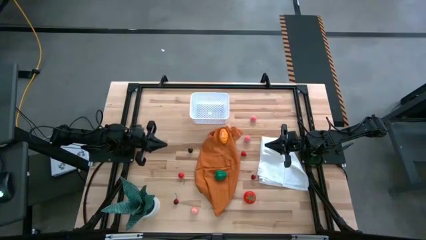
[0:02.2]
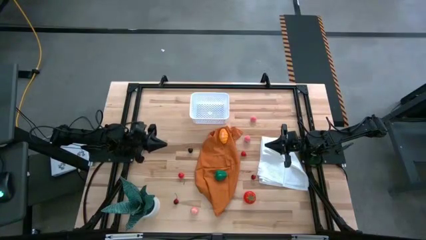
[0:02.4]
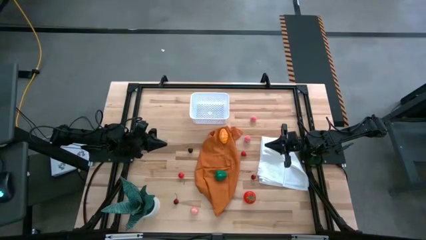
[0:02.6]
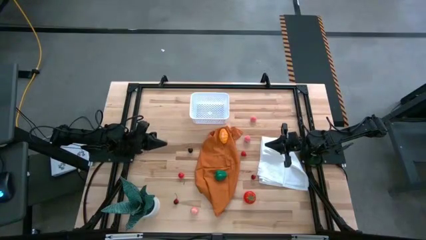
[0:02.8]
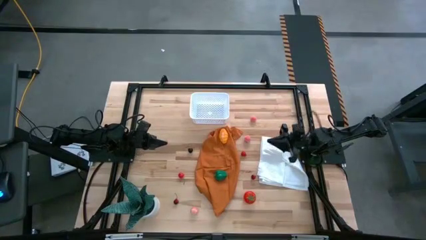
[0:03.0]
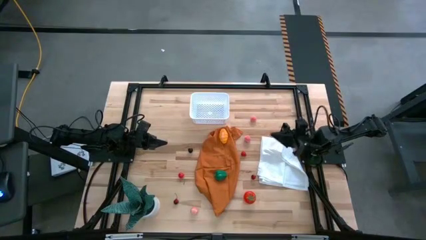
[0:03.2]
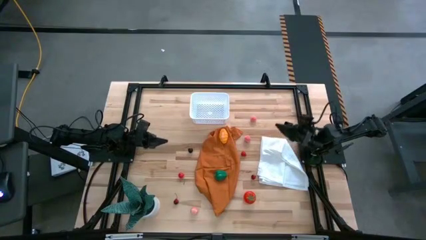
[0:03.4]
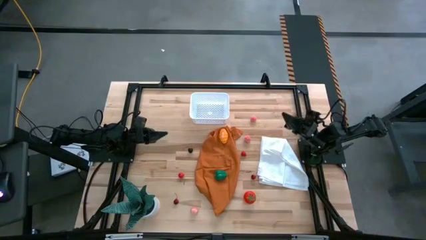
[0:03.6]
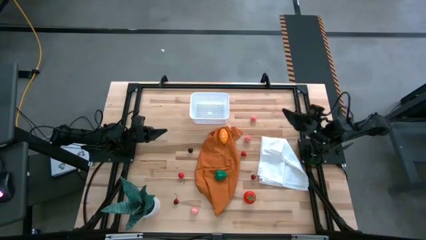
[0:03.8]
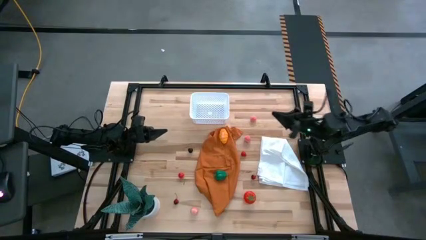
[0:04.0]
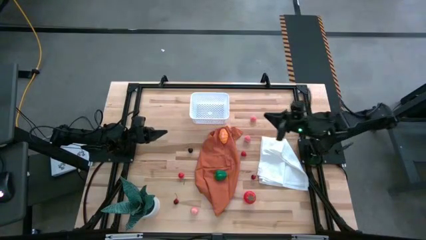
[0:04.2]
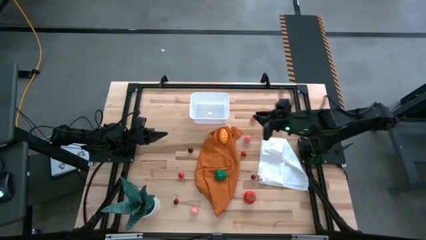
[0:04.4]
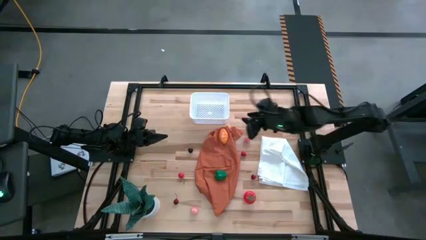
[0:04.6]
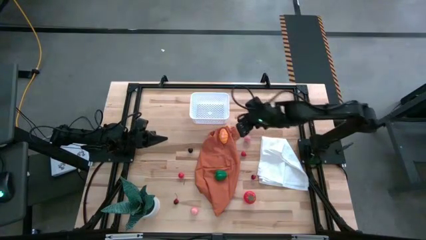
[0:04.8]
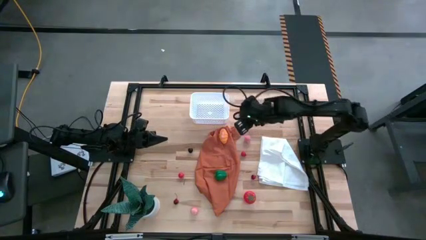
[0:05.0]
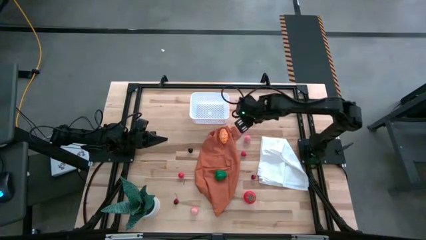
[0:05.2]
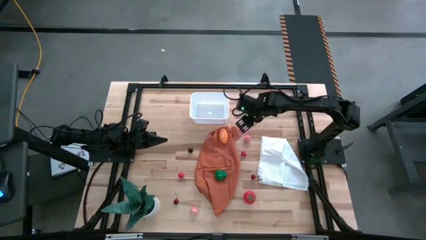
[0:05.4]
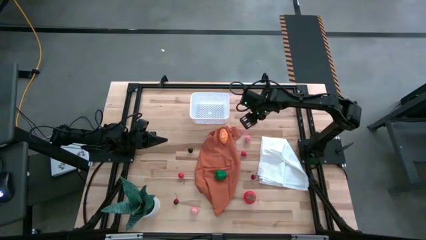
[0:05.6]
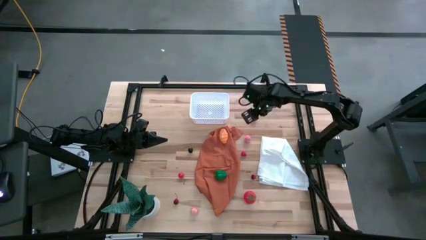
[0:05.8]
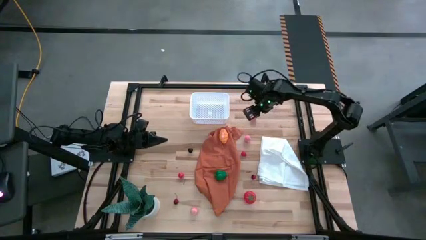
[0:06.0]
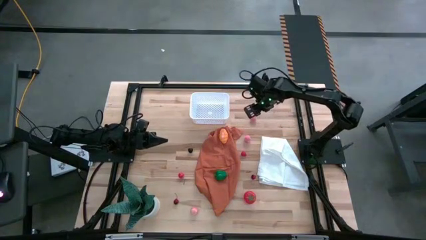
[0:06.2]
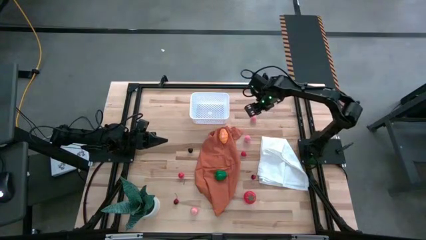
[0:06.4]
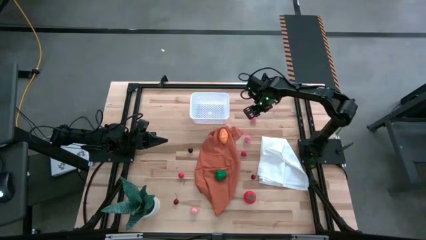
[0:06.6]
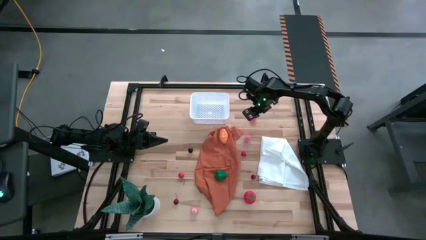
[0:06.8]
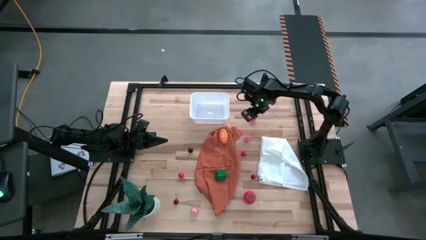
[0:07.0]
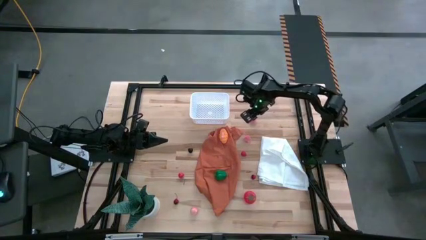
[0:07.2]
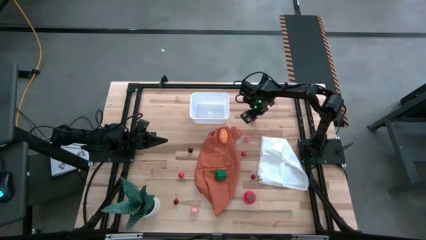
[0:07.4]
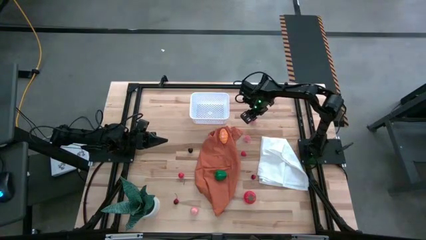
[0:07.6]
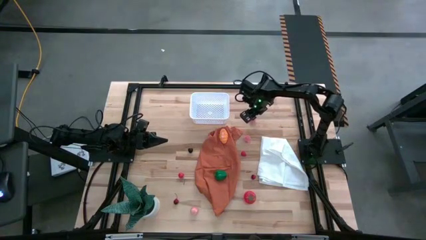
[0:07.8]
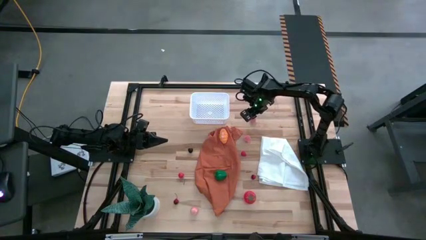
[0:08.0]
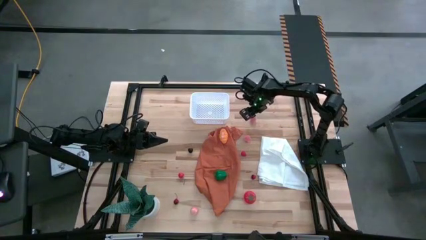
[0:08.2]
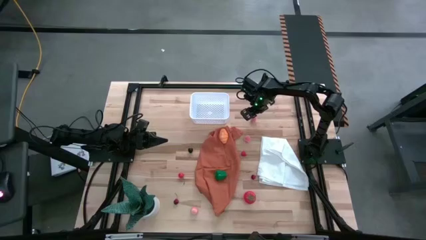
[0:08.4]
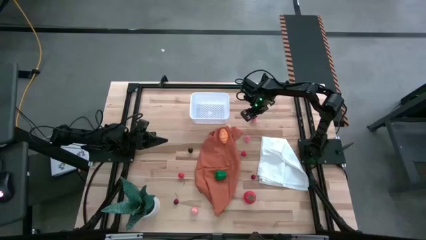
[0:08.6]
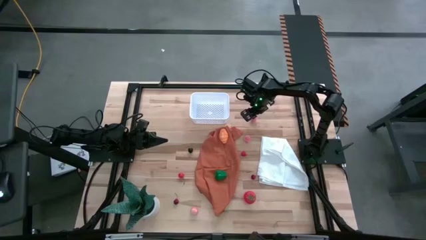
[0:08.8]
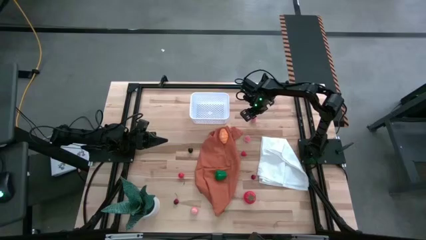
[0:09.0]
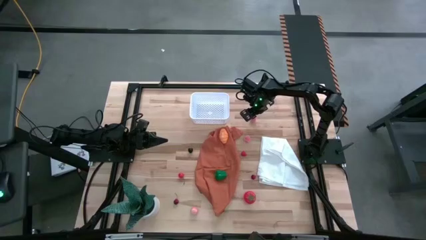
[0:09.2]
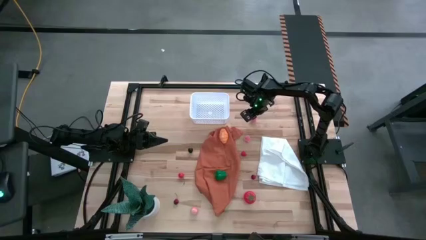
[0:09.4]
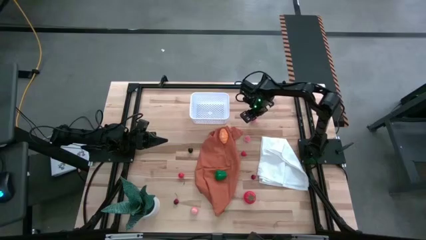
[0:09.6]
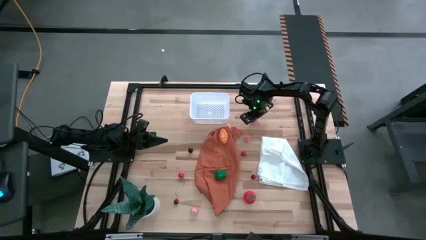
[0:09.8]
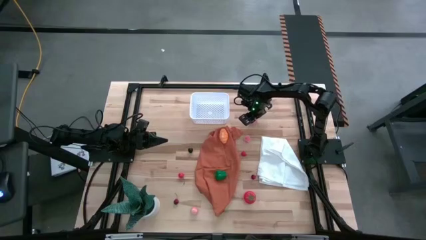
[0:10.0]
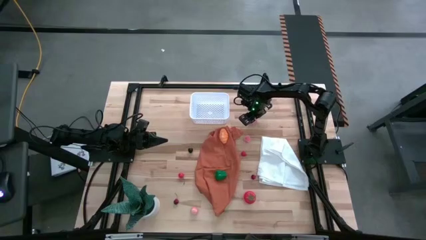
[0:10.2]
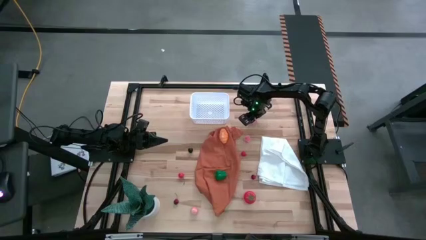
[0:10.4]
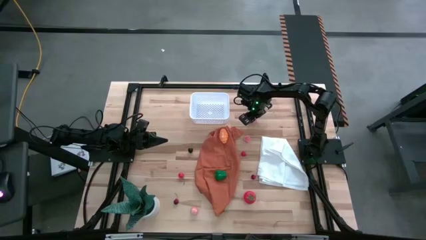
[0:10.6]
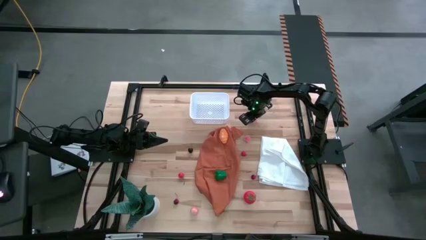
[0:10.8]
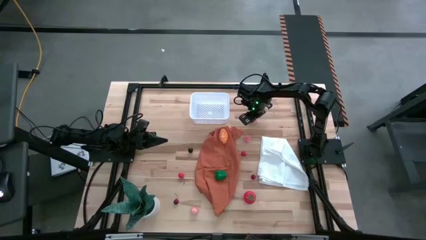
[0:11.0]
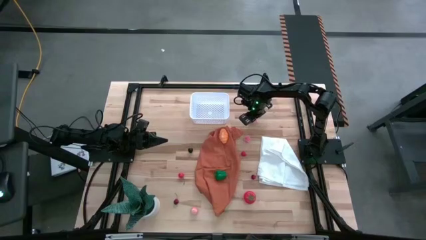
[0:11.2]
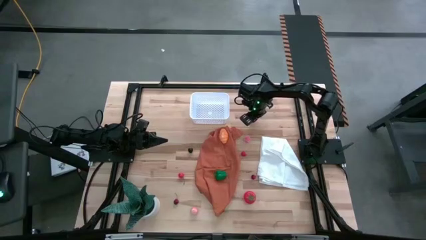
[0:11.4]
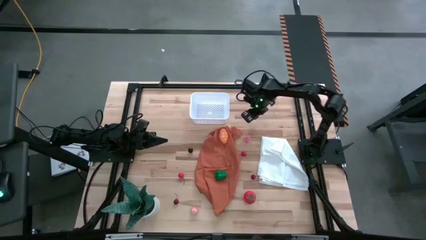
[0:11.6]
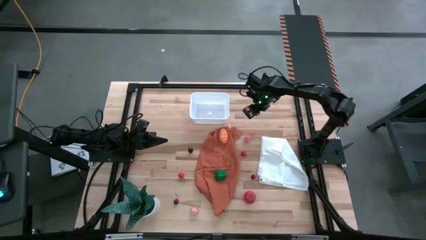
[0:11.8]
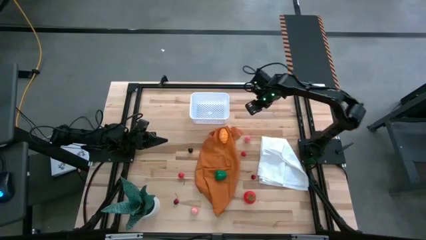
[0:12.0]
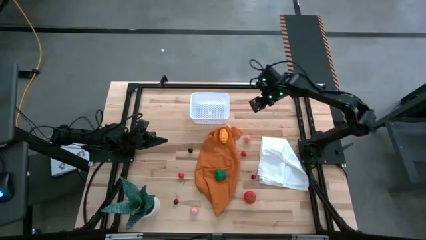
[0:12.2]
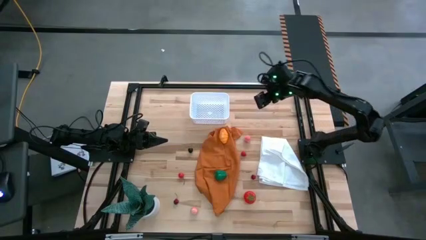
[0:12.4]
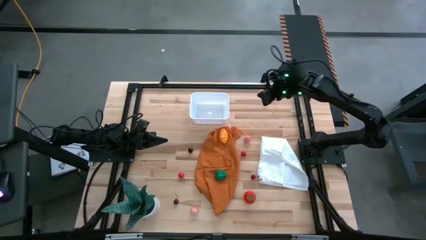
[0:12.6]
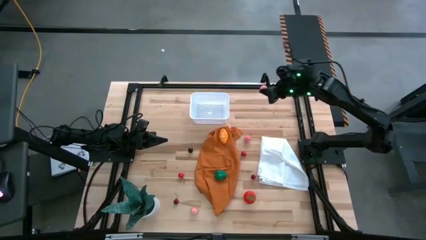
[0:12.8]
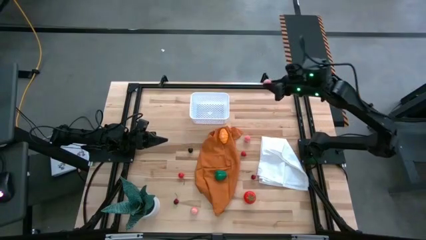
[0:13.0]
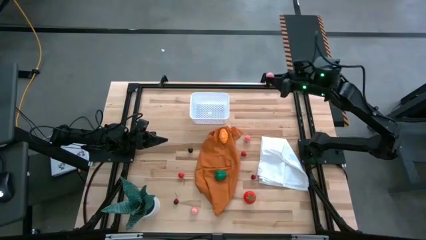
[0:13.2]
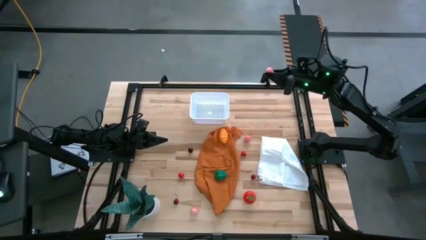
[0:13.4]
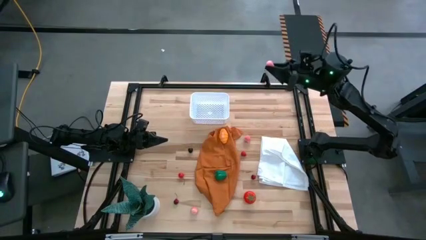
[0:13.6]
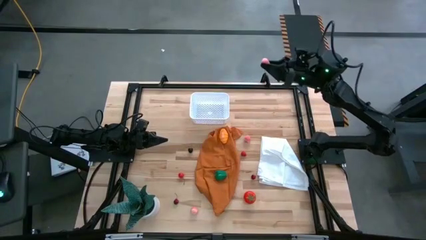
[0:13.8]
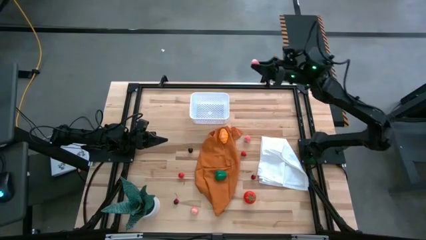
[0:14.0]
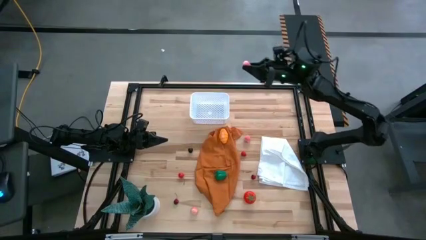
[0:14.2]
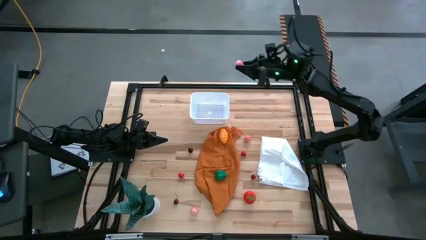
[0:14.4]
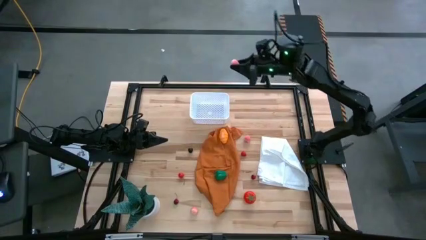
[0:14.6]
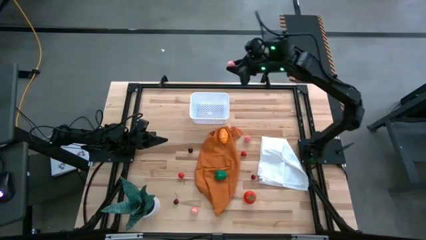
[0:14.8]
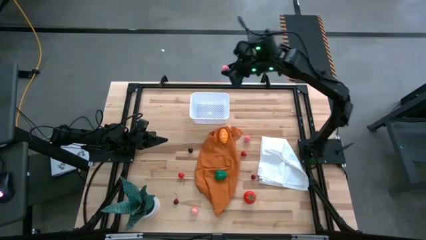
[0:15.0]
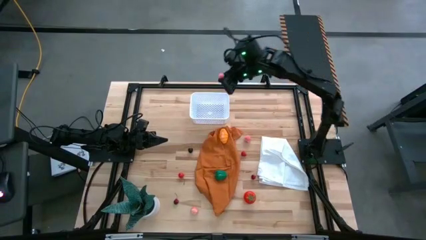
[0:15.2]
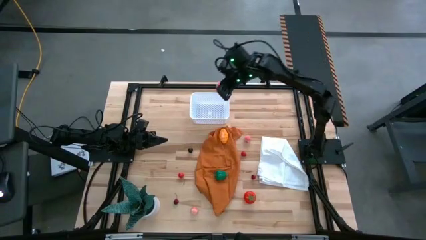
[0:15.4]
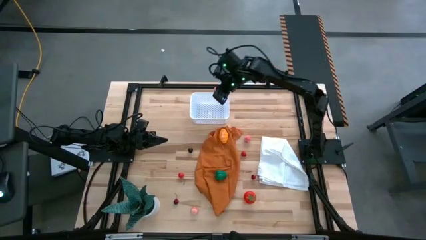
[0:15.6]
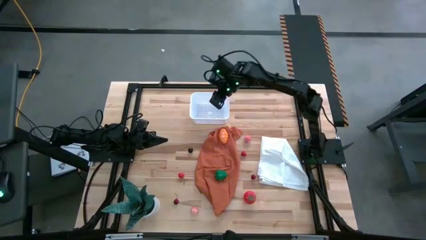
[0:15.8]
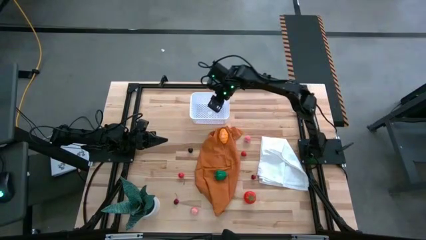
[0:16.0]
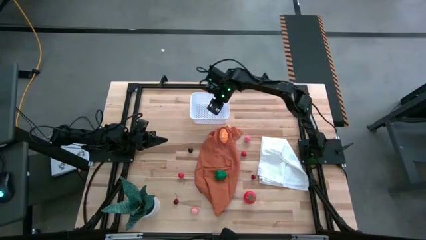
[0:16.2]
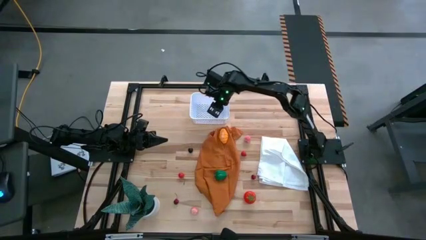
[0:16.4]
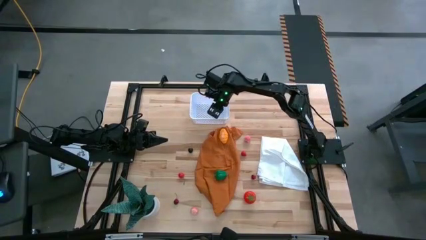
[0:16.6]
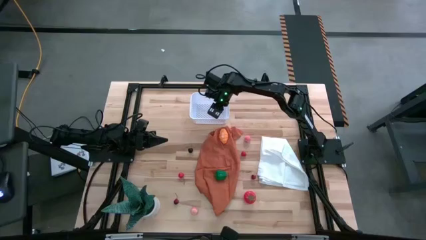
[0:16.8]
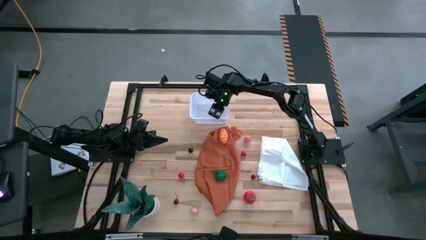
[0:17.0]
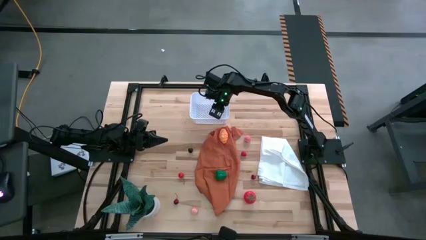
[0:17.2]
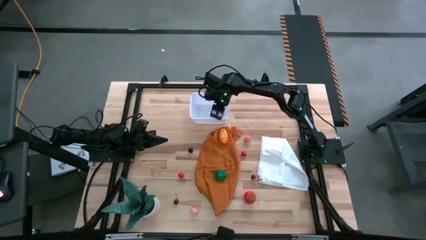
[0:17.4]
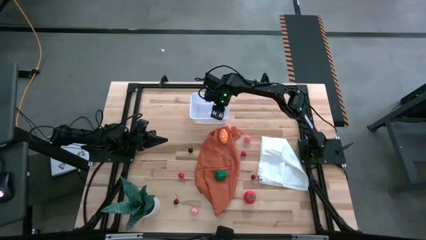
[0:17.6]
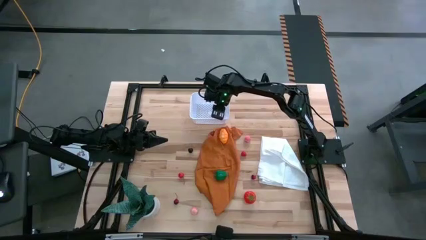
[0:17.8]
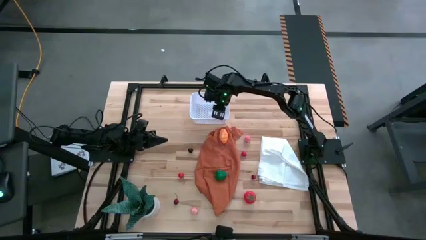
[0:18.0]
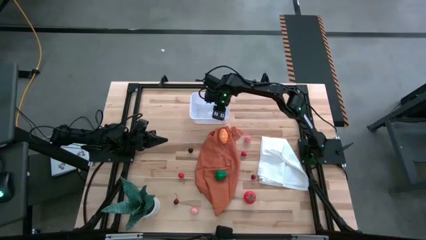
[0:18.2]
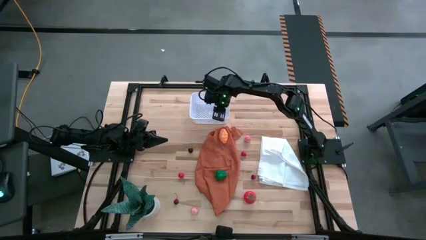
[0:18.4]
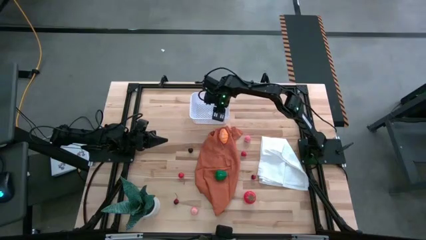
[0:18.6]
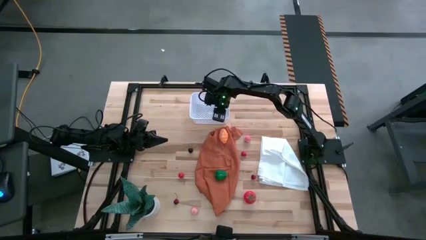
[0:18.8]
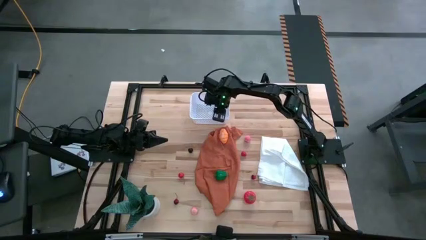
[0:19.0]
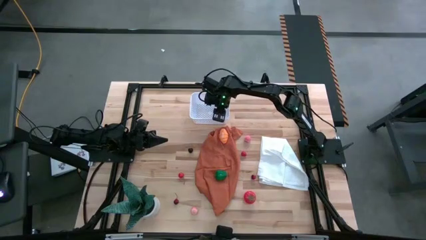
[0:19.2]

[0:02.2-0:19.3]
Task: Pick and placing Produce into tupperware
Put the top pink peach into the white basket
